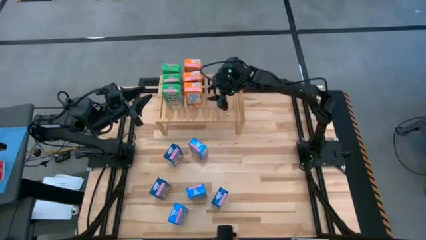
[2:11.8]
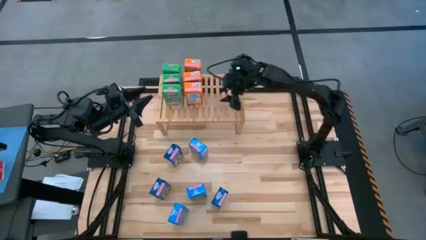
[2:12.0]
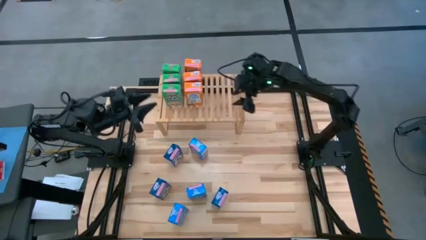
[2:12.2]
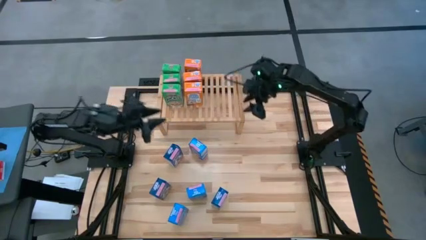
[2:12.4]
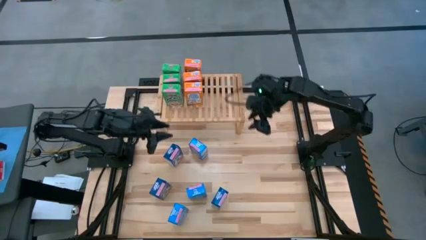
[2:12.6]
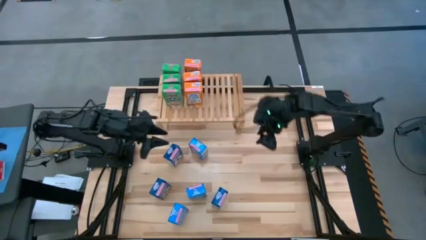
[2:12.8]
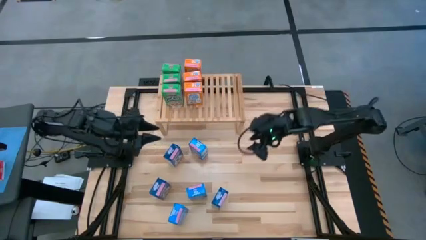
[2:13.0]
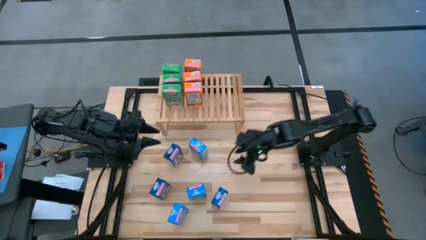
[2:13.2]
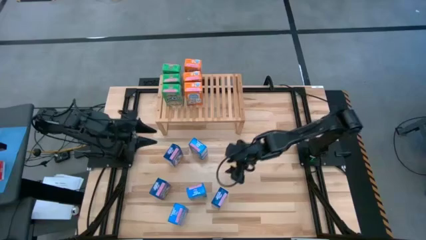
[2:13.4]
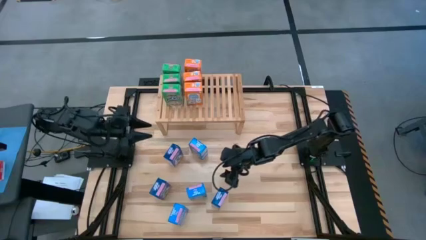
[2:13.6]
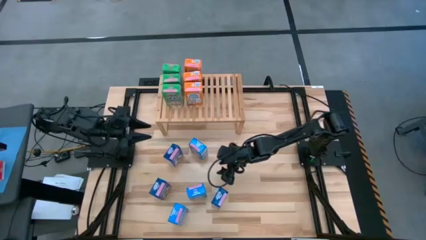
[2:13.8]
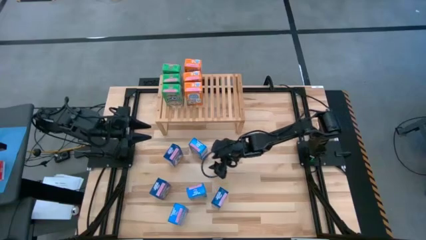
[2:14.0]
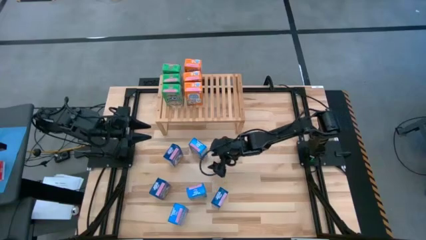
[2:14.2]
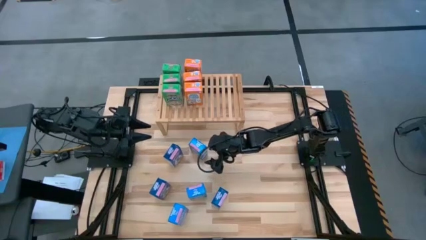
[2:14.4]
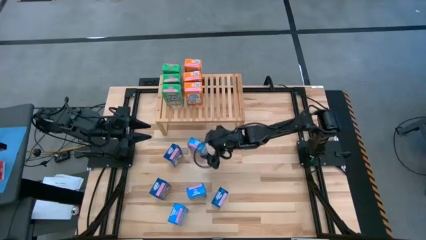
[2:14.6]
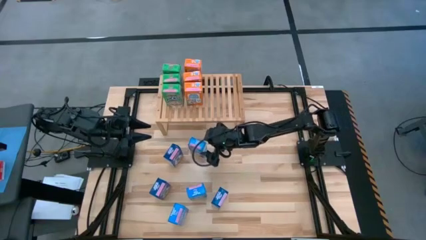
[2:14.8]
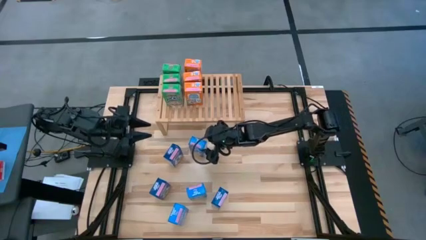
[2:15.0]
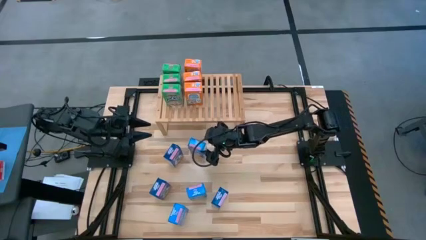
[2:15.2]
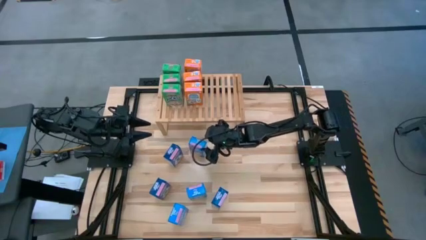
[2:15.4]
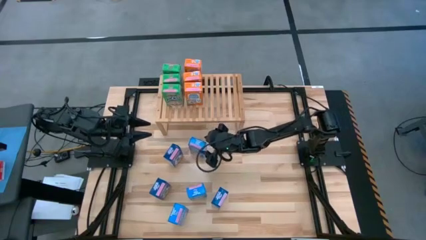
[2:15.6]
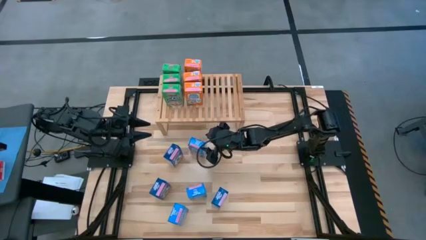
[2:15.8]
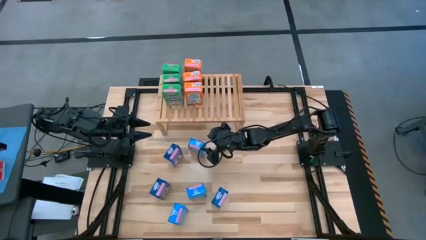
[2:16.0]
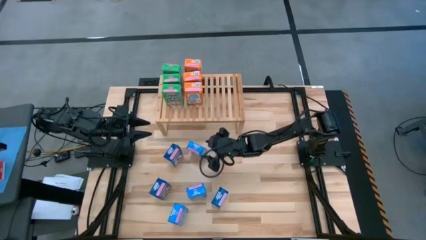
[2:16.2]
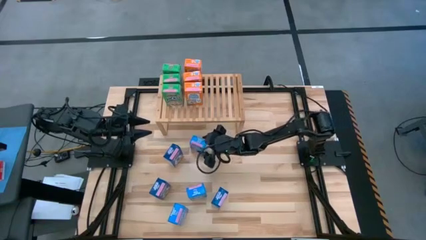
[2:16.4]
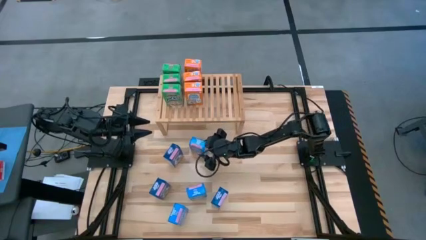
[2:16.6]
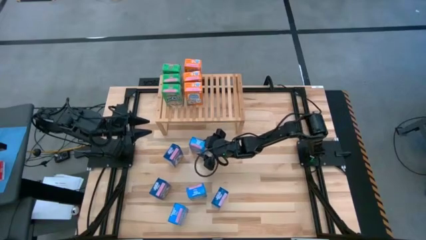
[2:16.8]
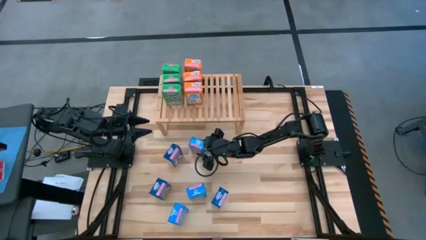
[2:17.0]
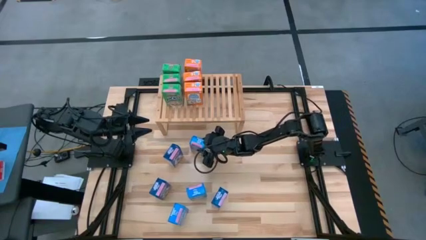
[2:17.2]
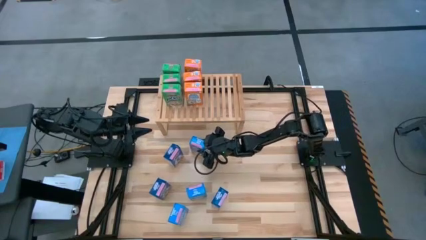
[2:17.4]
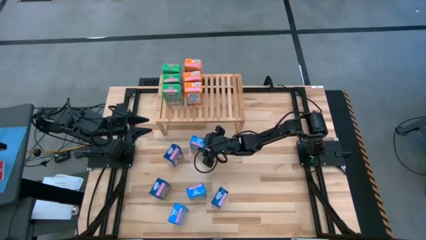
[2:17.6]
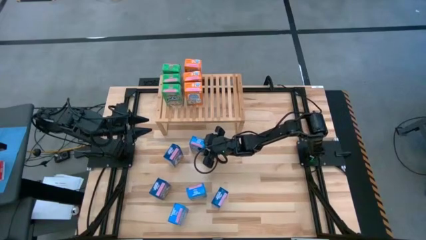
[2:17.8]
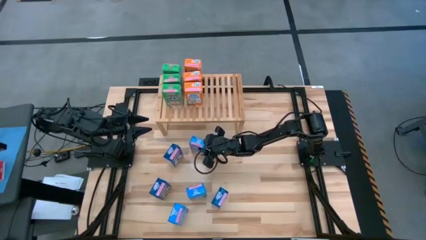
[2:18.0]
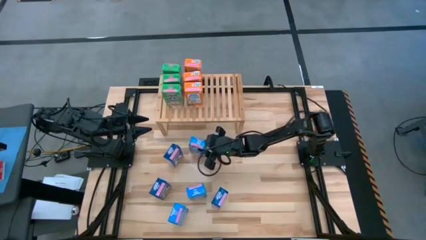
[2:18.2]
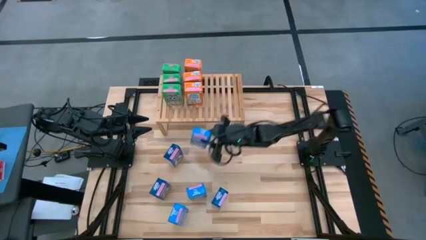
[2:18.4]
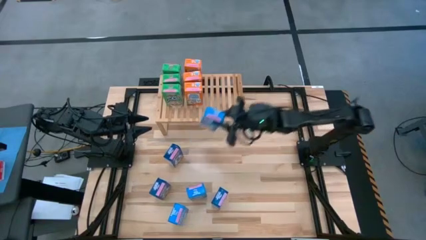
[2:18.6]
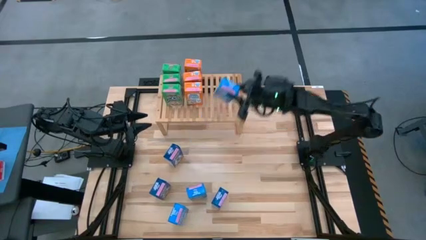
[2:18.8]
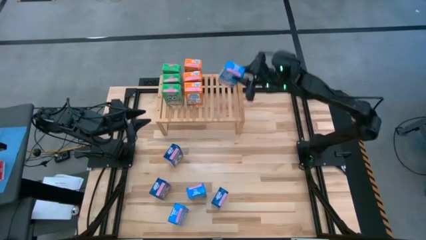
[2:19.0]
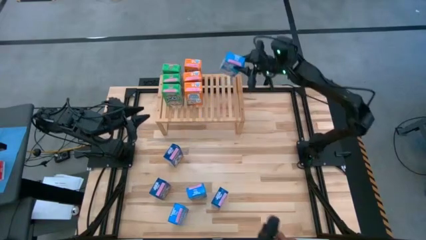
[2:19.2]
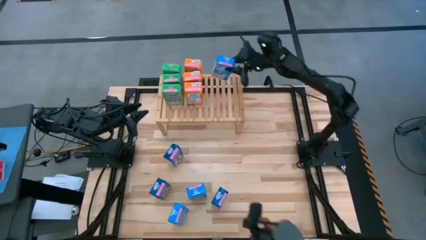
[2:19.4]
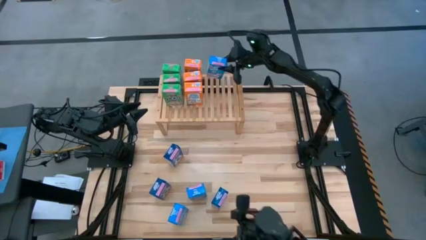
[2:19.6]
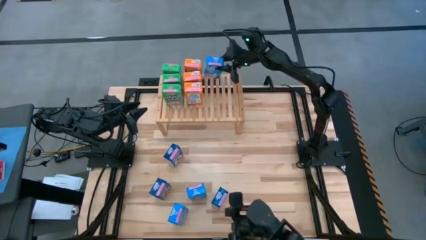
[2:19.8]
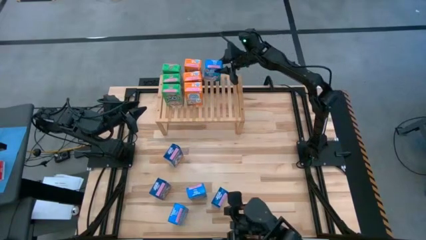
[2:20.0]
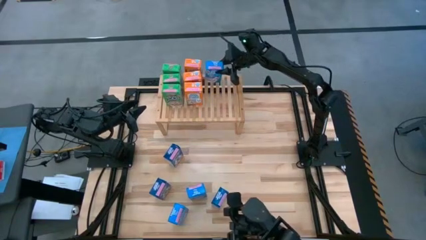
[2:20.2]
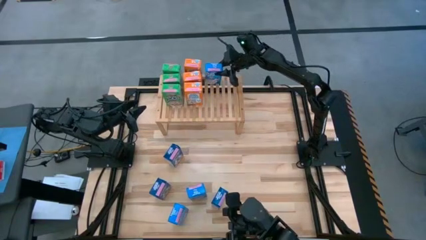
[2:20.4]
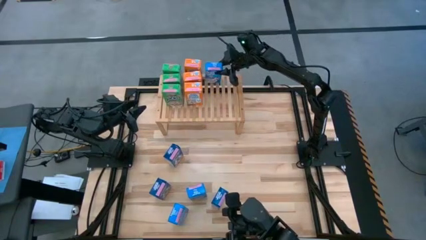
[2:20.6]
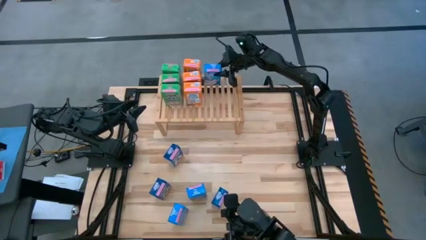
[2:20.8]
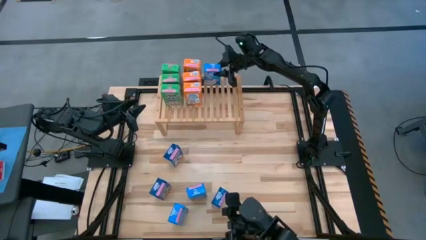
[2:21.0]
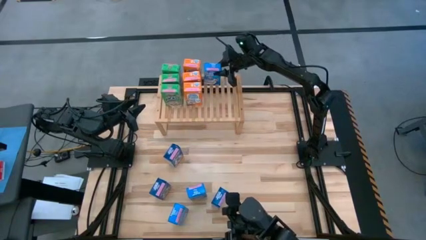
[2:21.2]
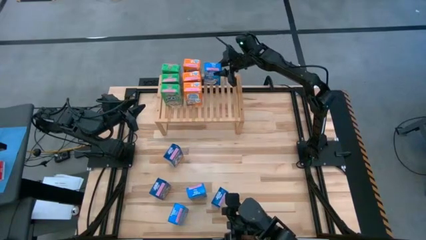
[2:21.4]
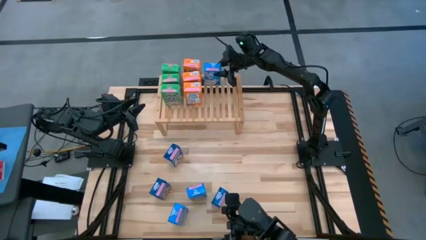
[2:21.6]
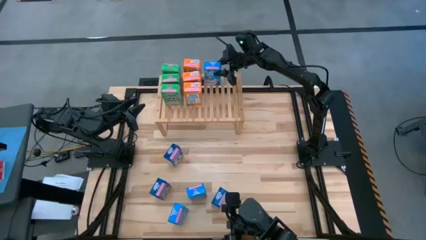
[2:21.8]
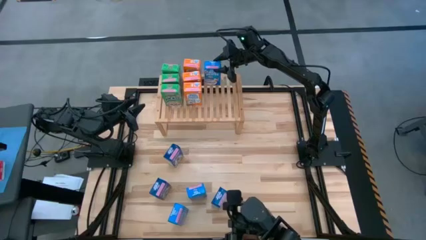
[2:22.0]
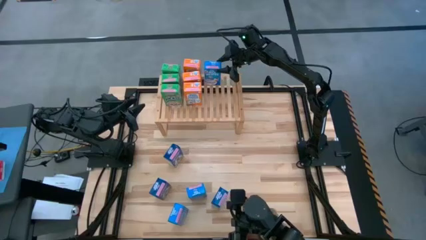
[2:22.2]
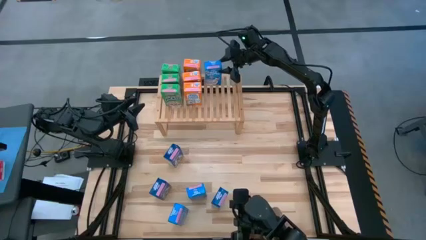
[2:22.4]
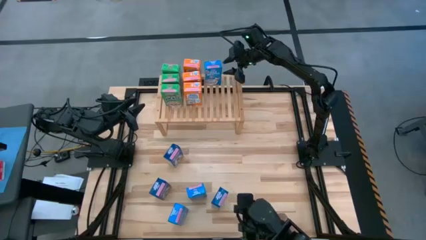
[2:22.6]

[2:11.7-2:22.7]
Task: Stack cereal on shelf
Put the top light blue cereal box on the shelf
